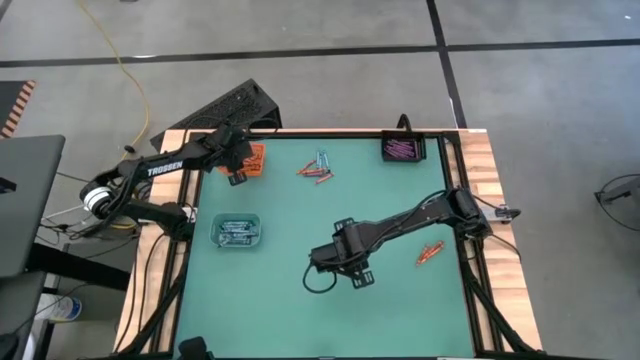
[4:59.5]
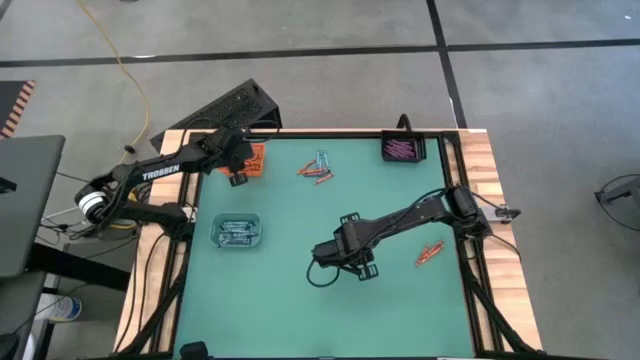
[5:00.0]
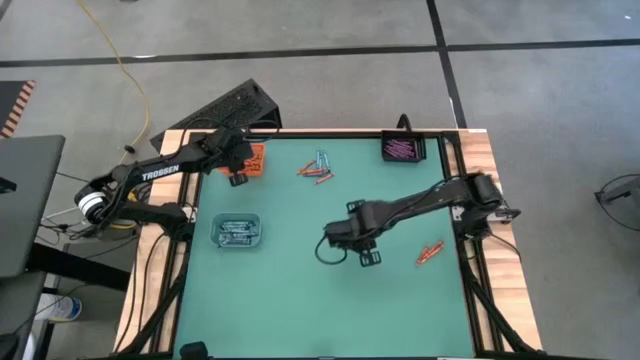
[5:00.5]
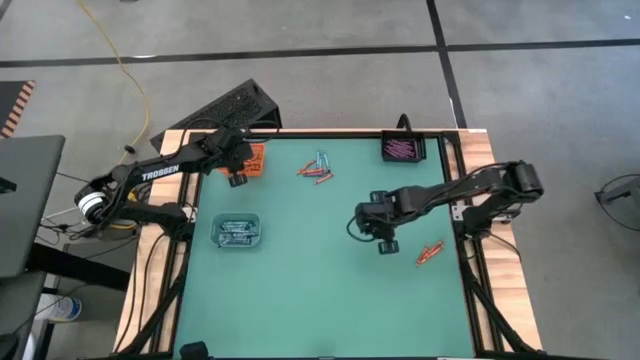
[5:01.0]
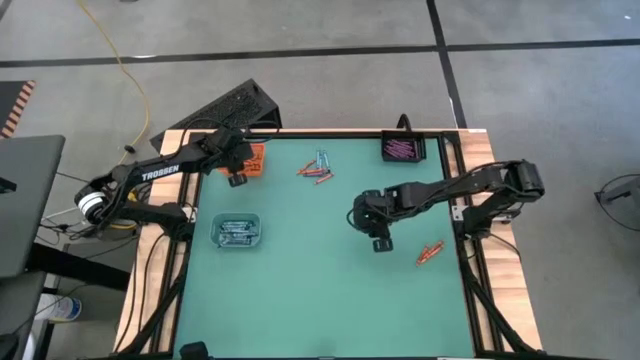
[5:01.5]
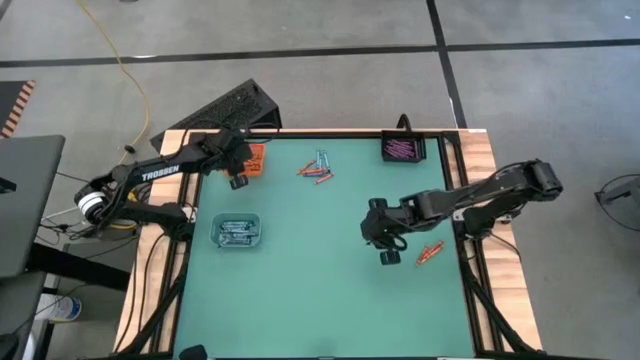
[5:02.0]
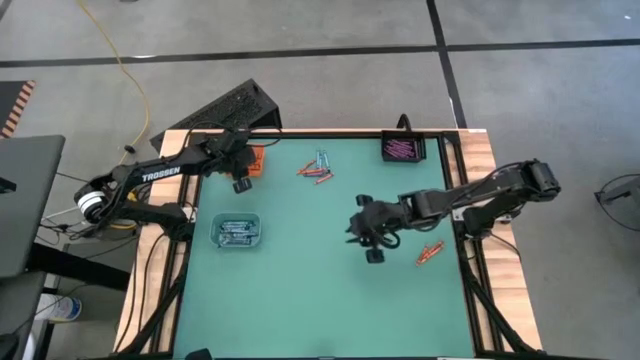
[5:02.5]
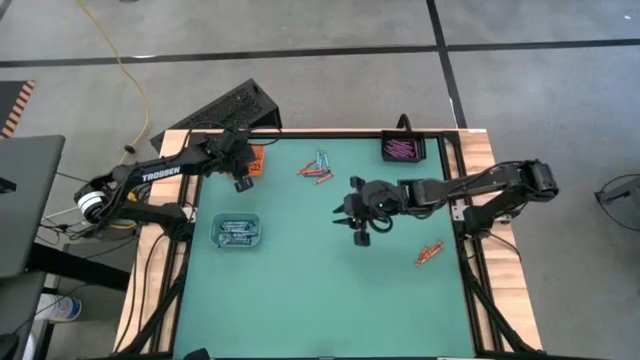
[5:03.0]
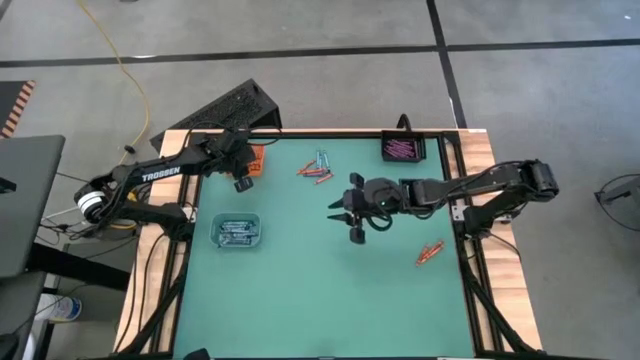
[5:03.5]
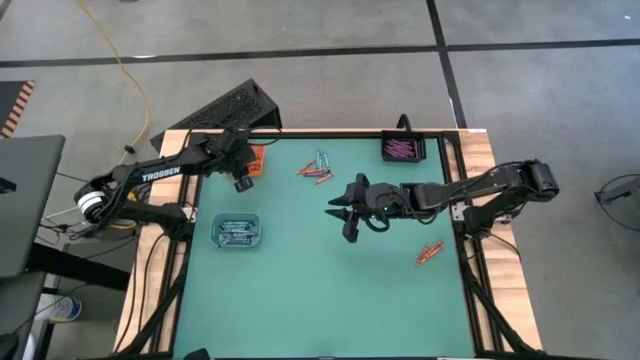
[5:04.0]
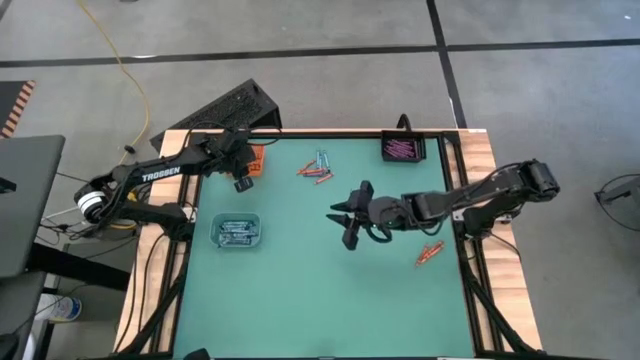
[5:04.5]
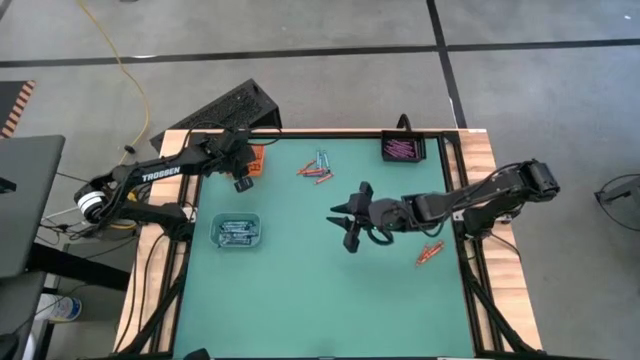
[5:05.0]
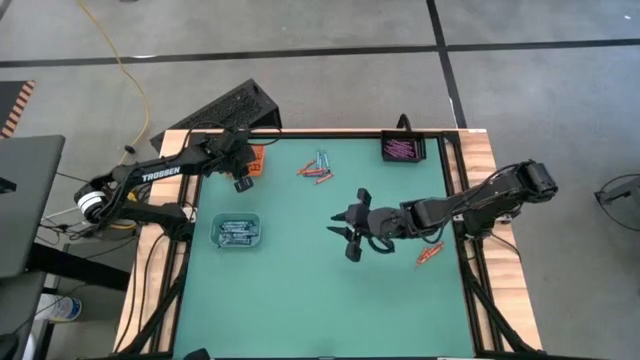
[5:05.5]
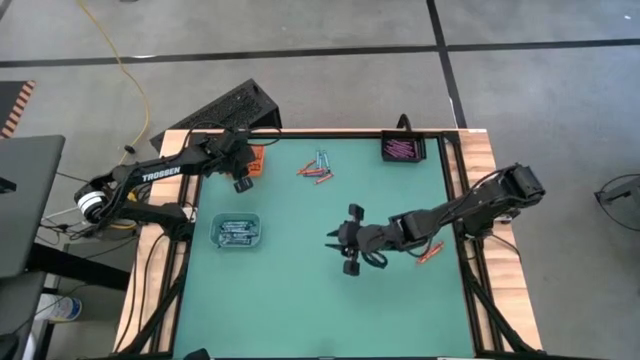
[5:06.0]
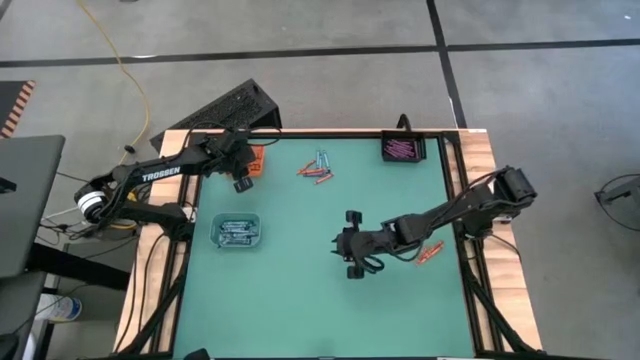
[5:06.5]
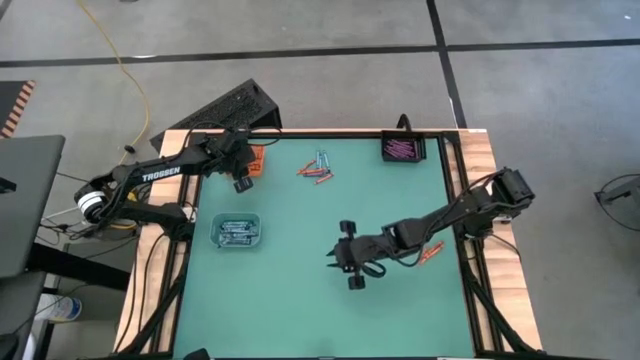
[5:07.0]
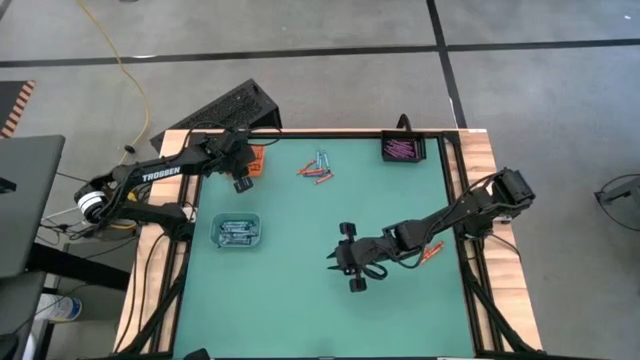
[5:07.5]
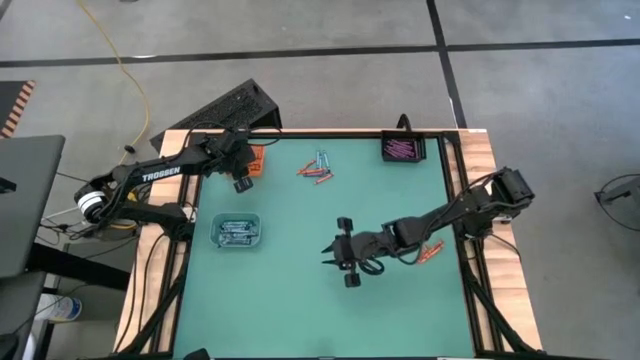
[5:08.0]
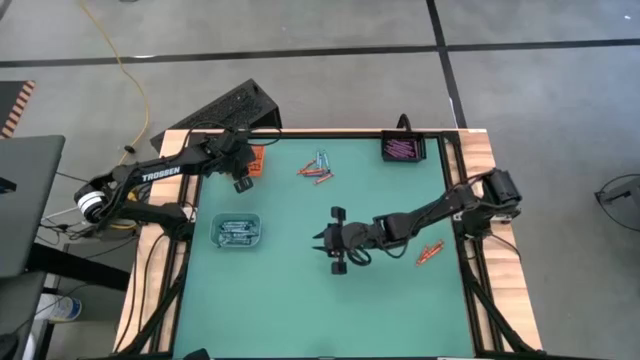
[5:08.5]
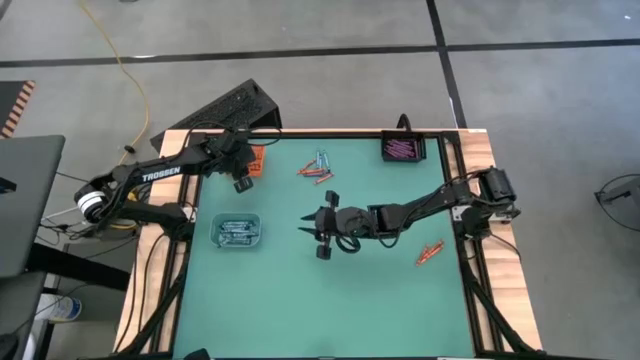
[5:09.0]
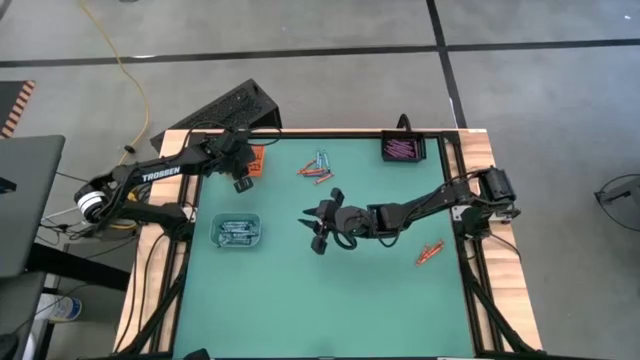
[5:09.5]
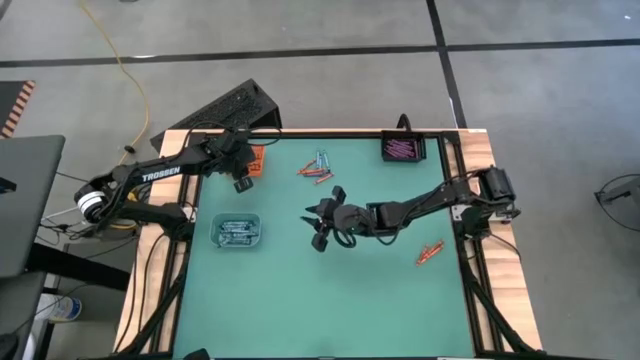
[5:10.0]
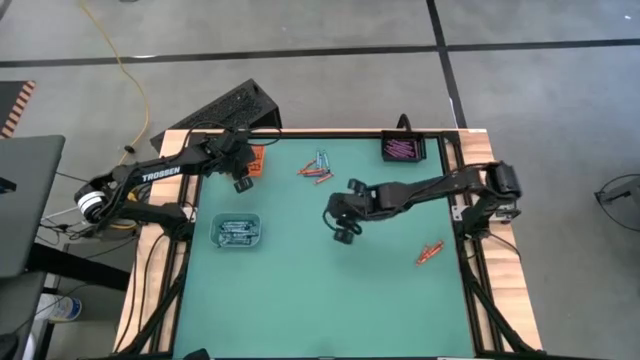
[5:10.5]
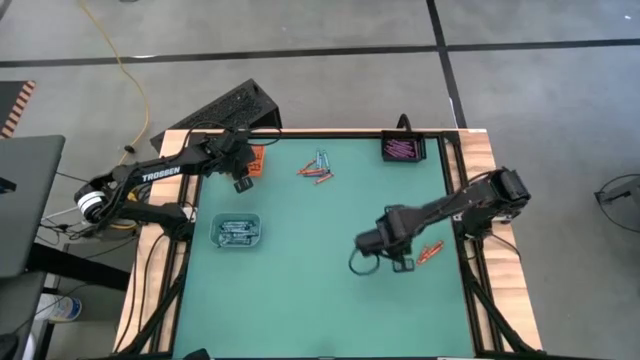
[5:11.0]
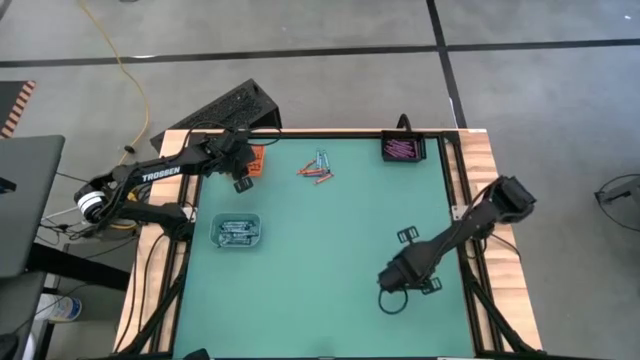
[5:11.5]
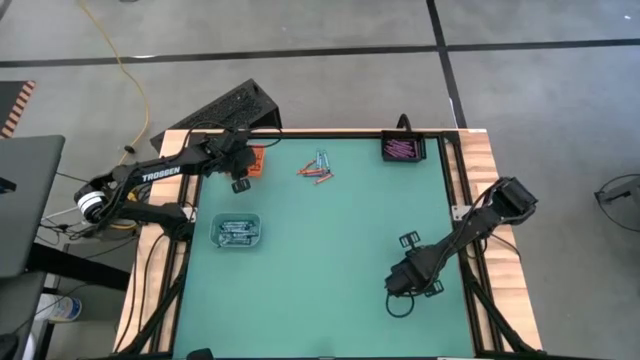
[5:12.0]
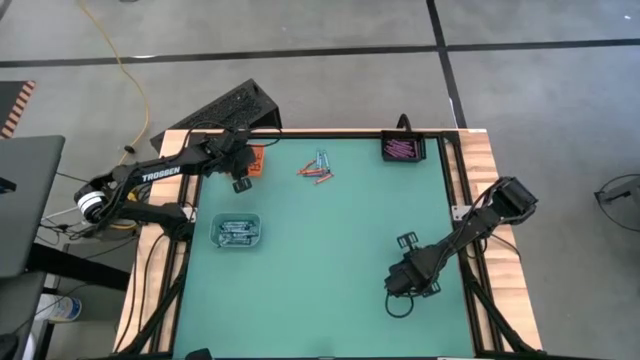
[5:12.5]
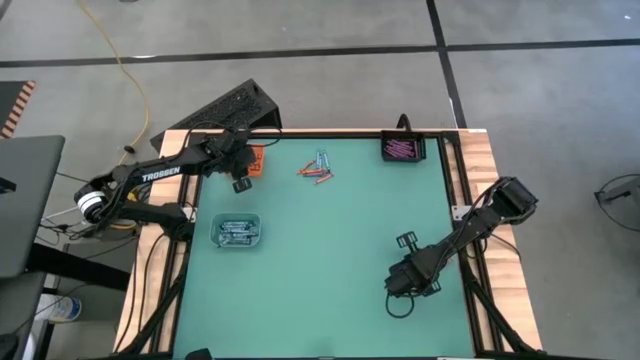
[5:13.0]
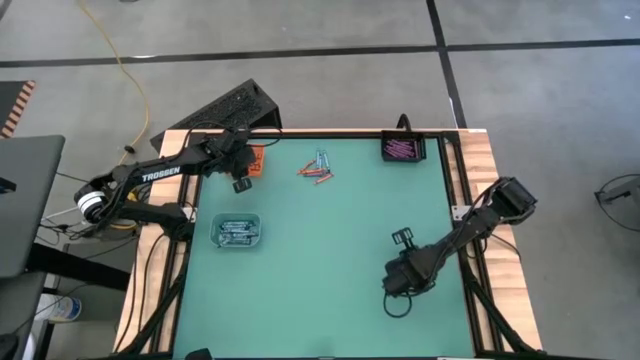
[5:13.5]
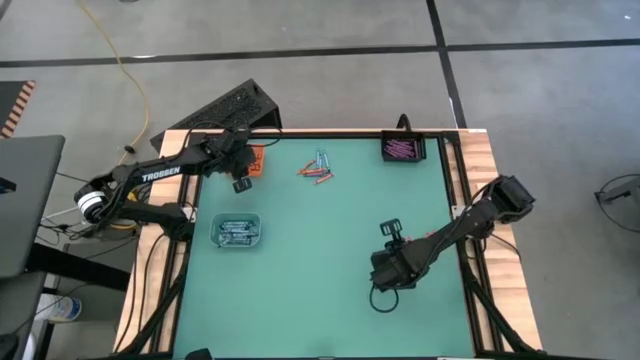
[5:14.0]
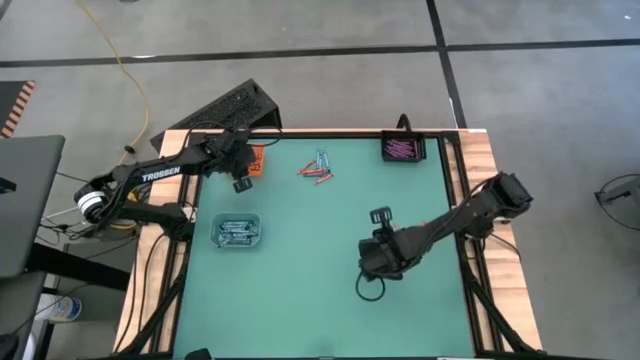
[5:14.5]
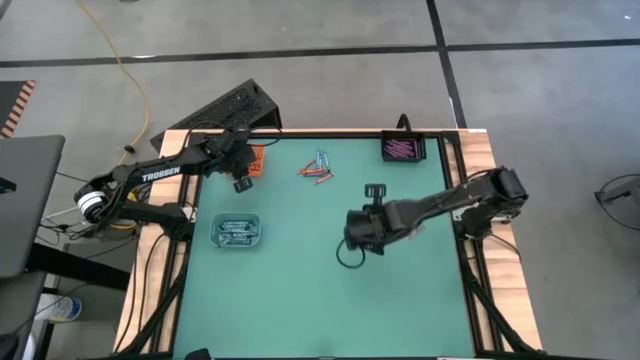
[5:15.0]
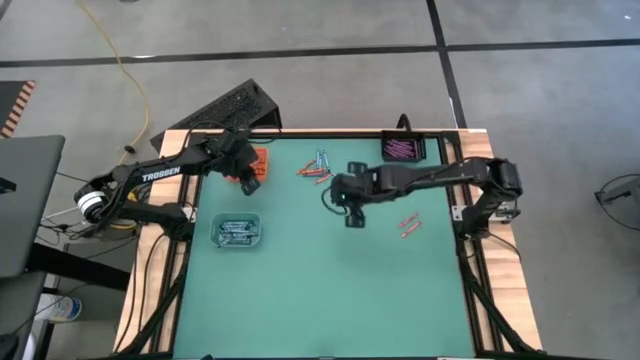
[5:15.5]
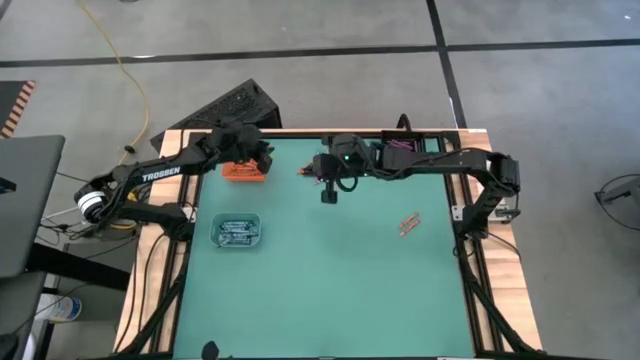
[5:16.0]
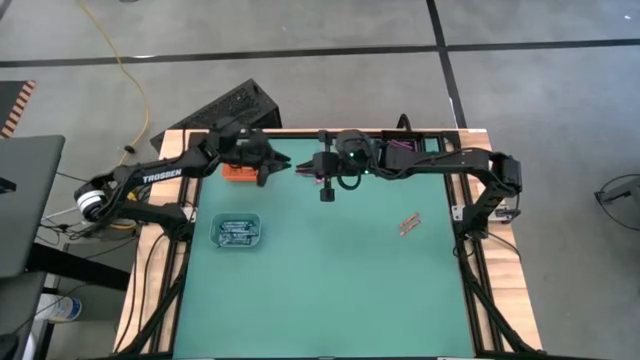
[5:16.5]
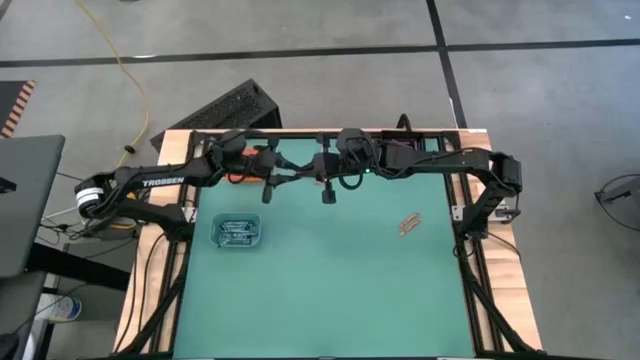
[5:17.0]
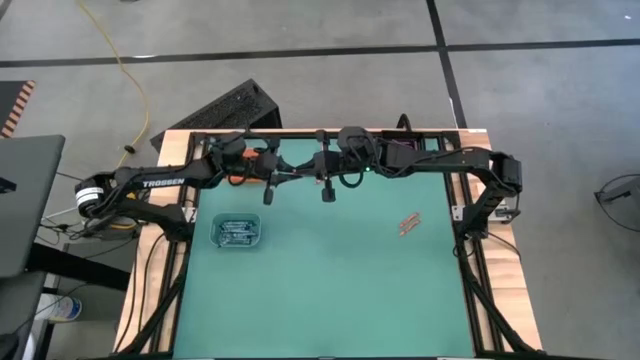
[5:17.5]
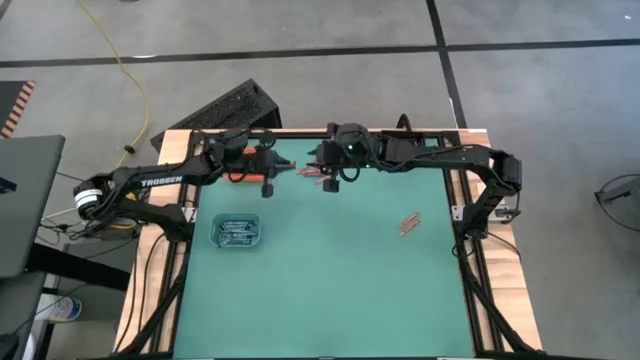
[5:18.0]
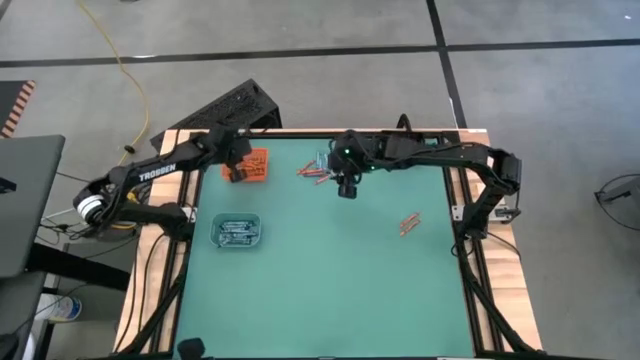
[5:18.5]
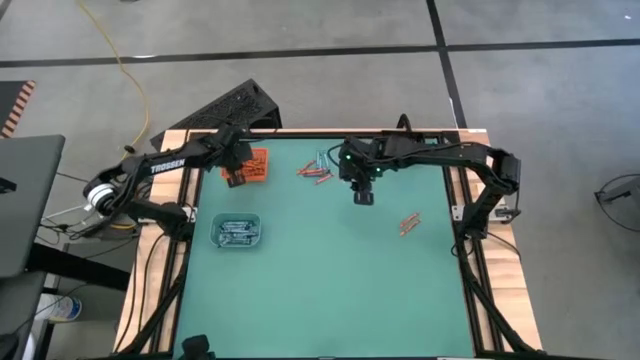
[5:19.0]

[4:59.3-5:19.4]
Task: Sort crayons
Put the right orange crayon into the top left orange bin

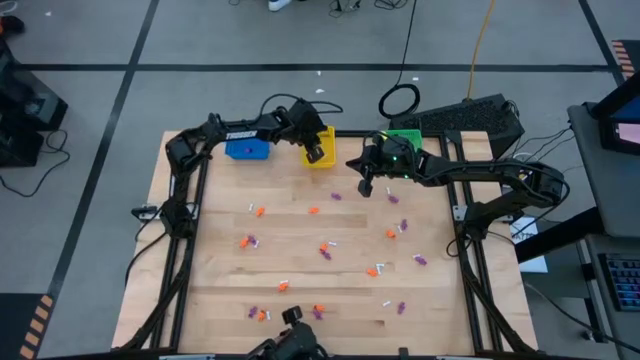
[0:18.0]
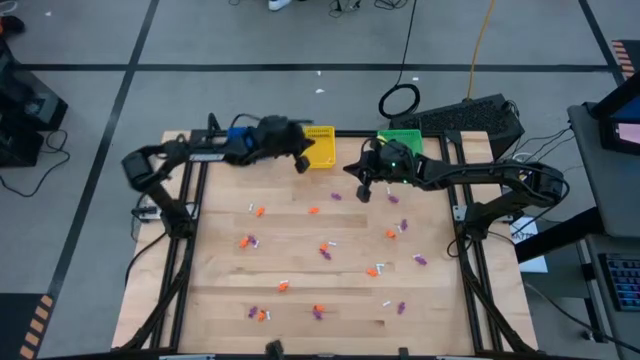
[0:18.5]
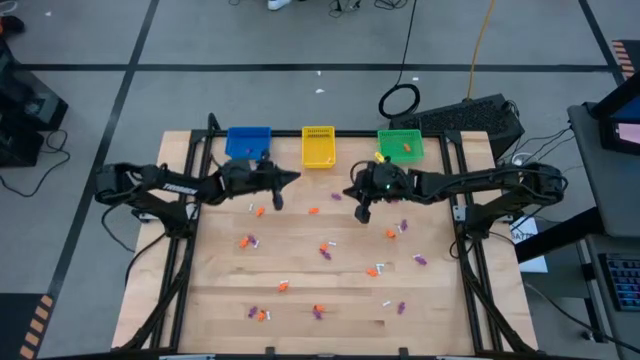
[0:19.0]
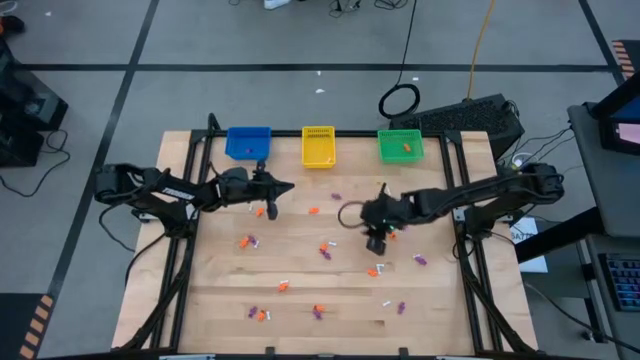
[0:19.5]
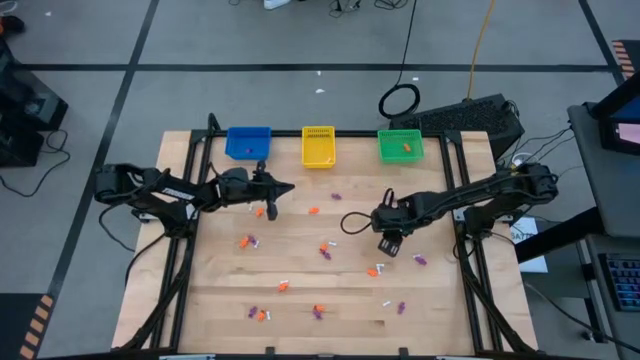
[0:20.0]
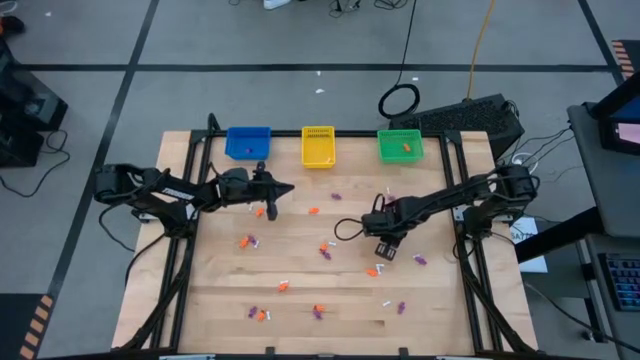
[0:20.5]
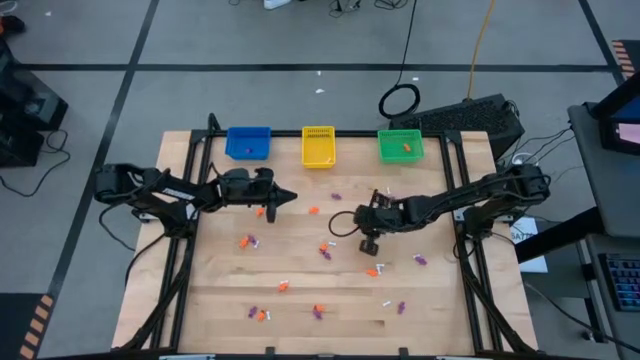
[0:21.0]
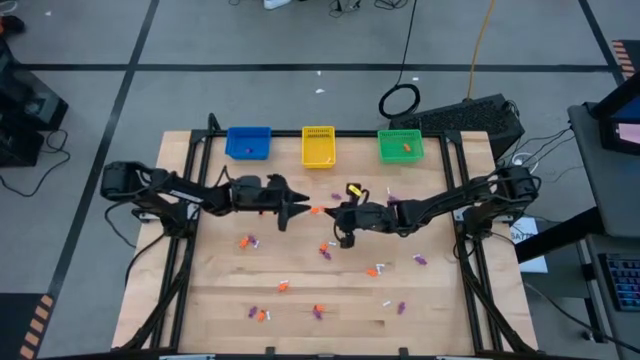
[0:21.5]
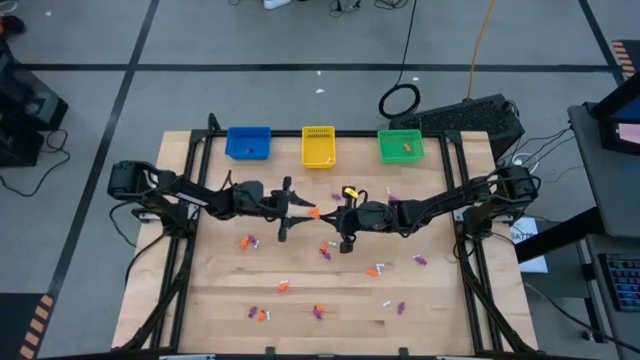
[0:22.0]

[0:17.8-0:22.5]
Task: Sort Halloween decoration
Put the orange skeleton toy into the green bin
